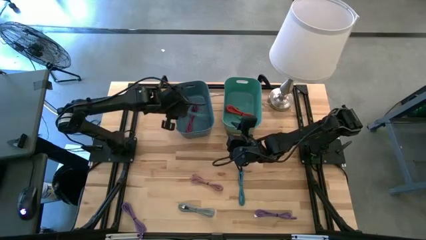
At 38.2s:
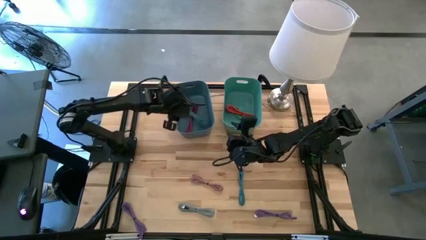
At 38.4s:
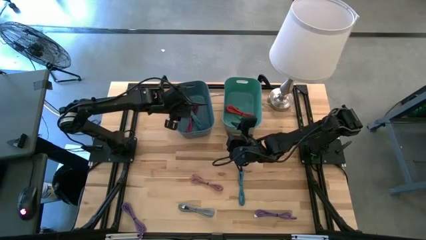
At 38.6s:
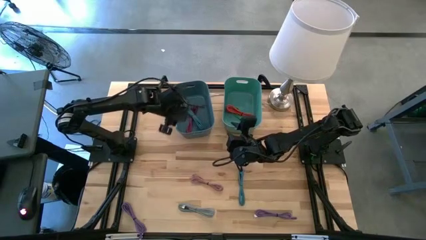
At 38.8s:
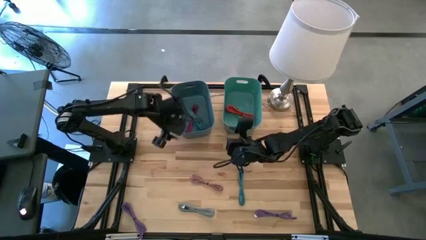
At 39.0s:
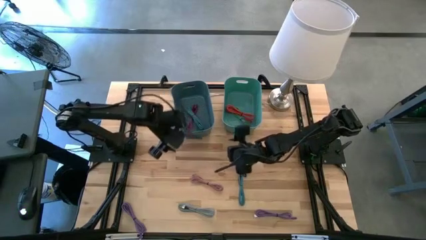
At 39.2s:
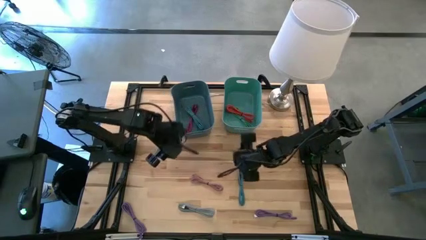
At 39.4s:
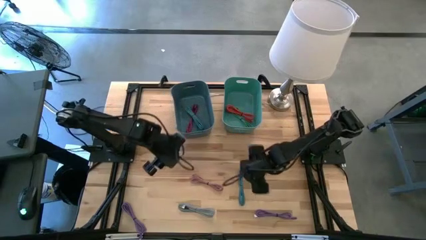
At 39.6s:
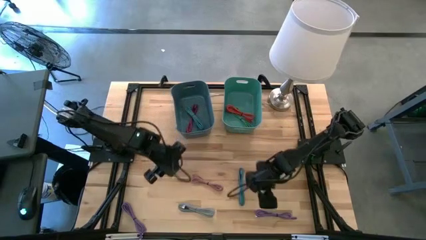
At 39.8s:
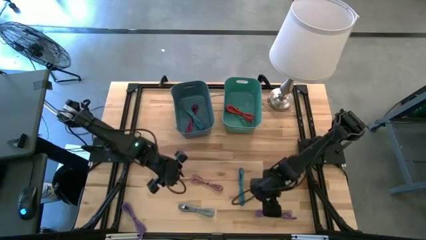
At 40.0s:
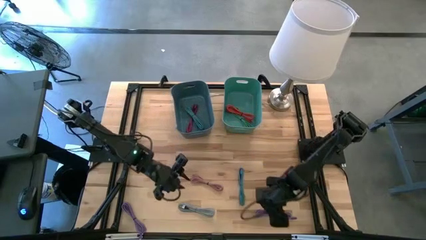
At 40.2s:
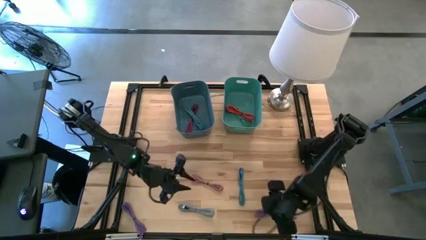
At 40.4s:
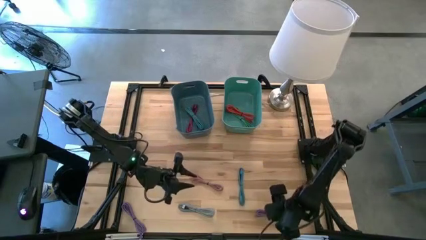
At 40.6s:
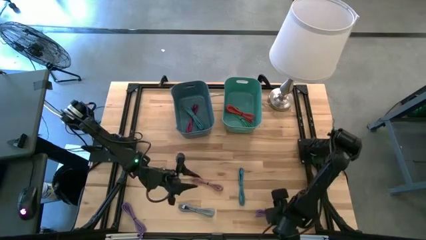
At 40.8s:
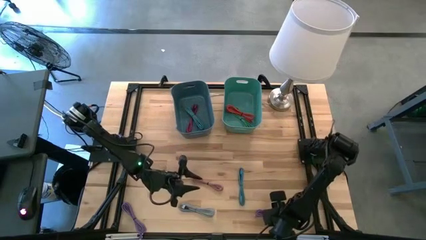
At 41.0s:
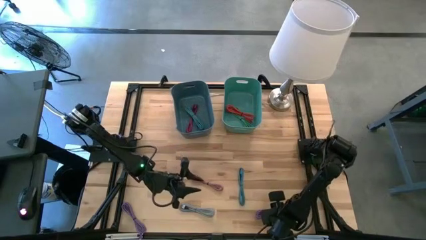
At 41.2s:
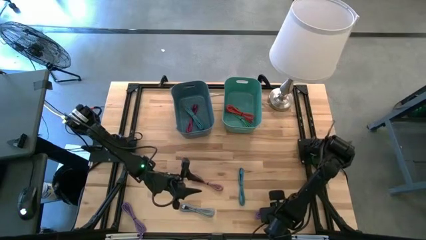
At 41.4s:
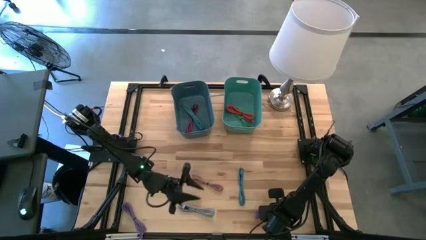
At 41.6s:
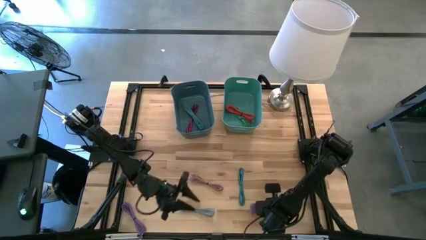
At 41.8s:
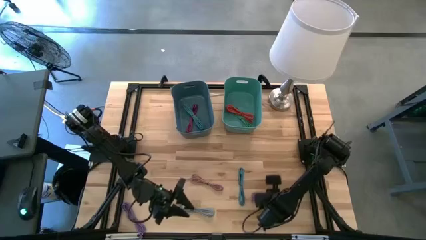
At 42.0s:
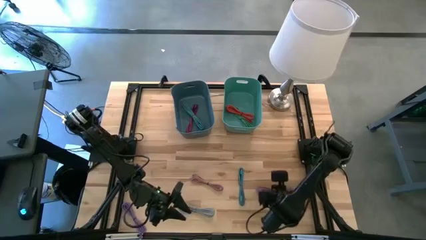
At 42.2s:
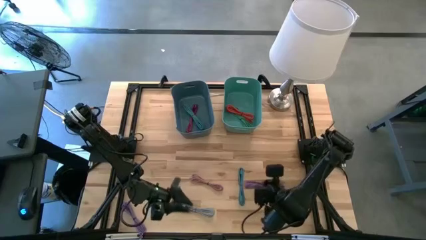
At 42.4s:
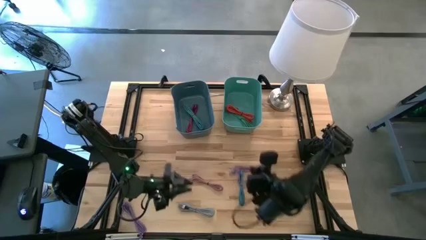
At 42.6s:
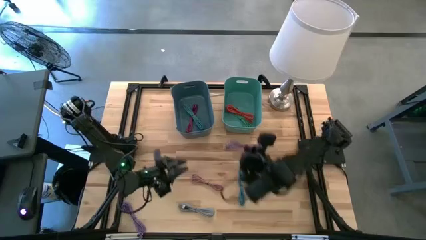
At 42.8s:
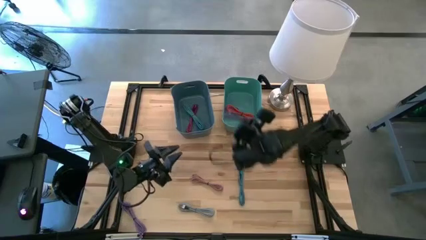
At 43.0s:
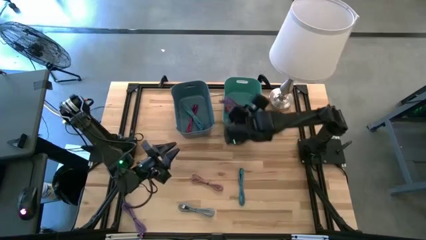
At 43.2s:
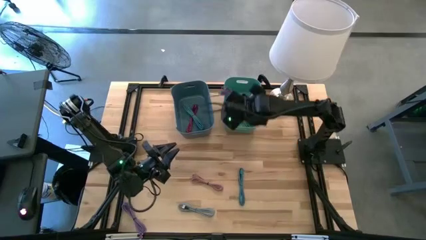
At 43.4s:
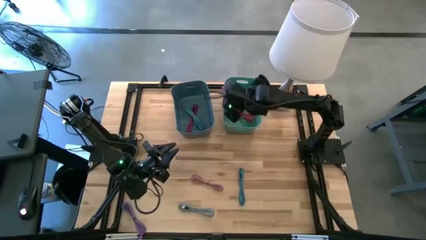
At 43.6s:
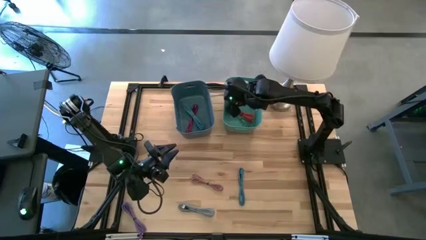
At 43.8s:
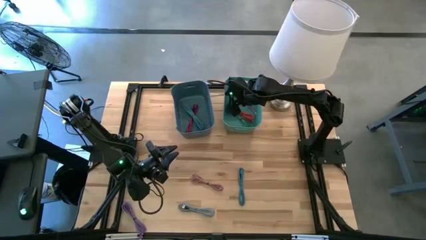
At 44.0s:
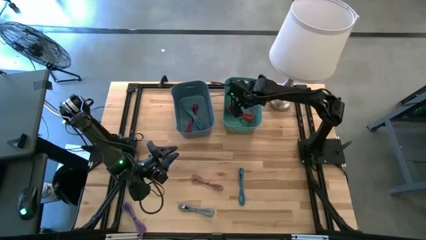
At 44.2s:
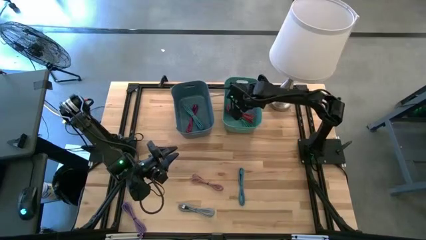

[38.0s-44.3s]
Task: Pick & Place USB Port
Put the right violet charger cable into the green bin

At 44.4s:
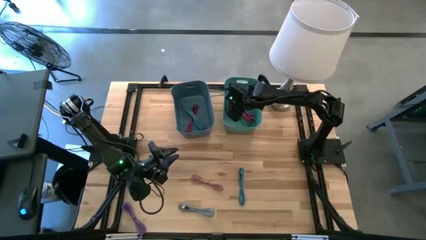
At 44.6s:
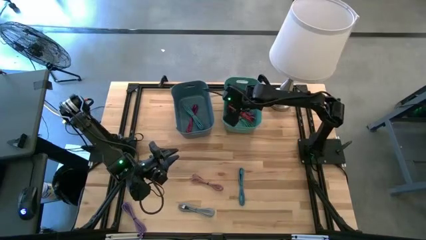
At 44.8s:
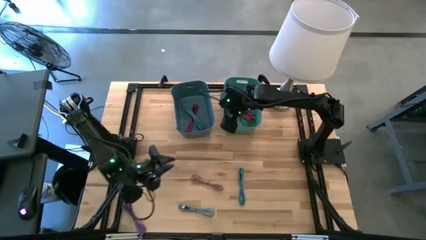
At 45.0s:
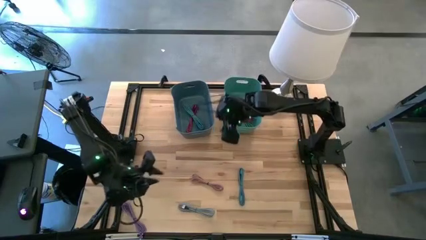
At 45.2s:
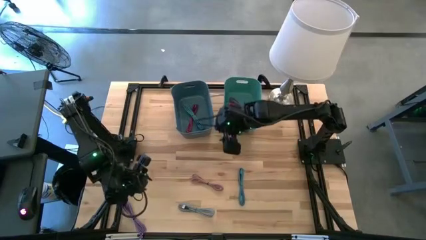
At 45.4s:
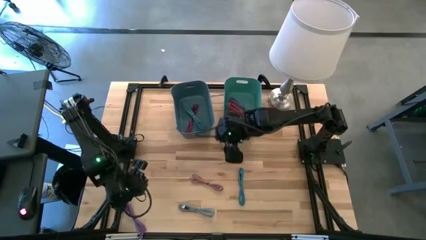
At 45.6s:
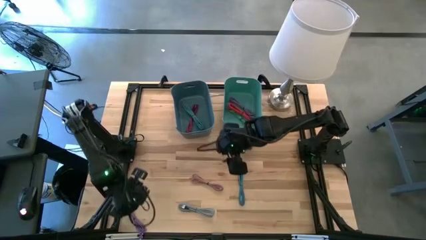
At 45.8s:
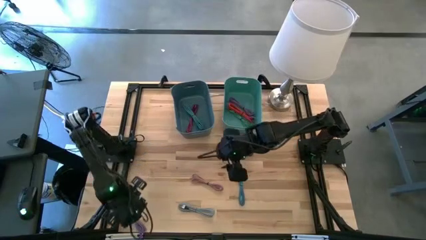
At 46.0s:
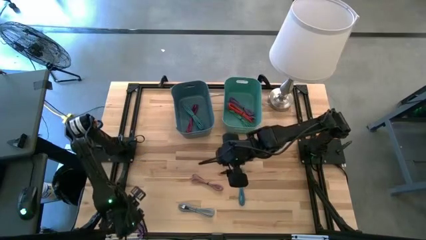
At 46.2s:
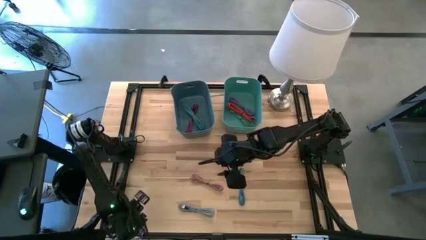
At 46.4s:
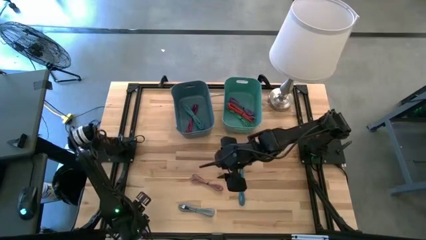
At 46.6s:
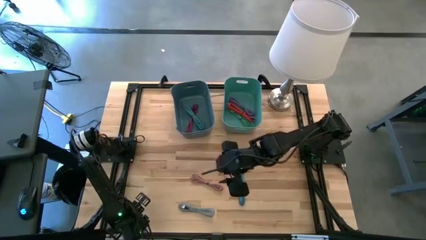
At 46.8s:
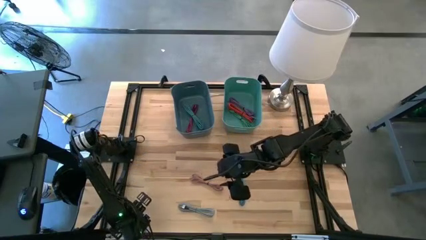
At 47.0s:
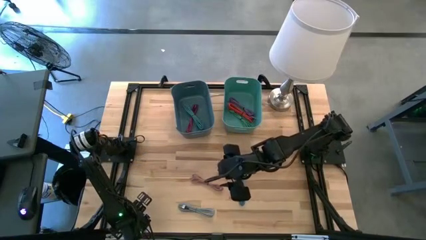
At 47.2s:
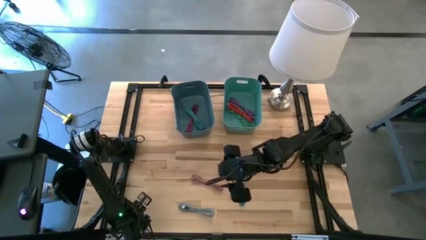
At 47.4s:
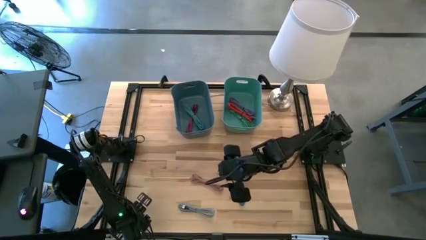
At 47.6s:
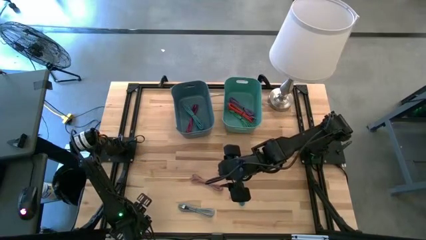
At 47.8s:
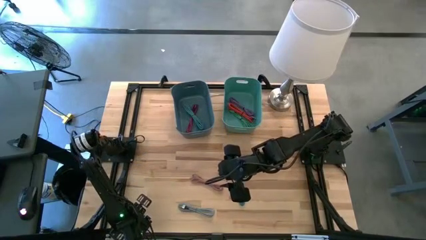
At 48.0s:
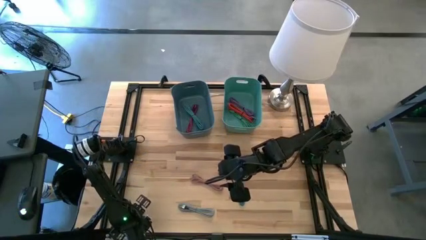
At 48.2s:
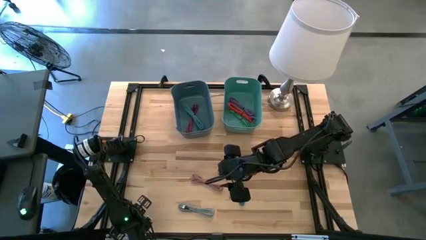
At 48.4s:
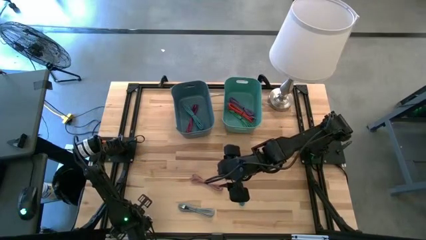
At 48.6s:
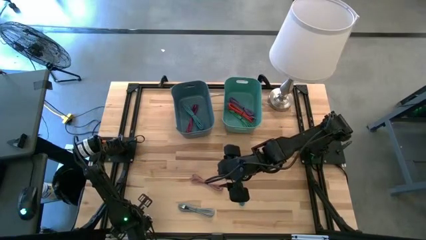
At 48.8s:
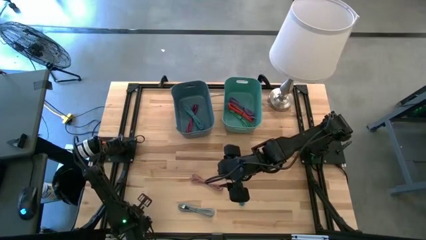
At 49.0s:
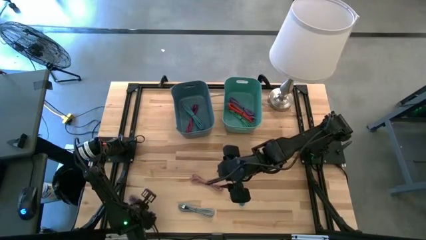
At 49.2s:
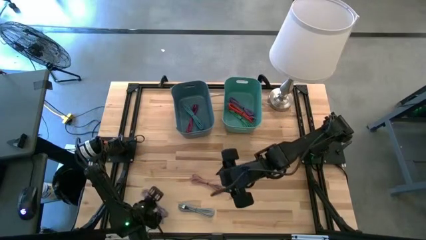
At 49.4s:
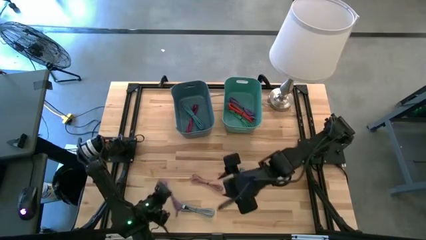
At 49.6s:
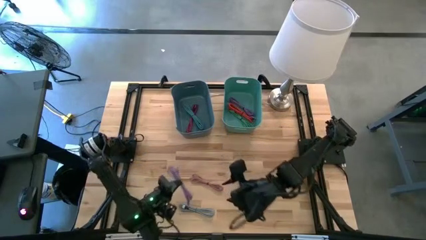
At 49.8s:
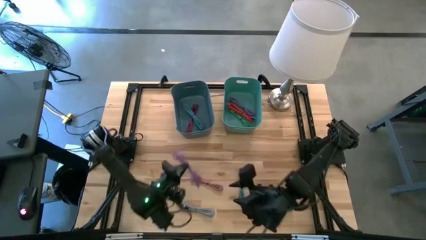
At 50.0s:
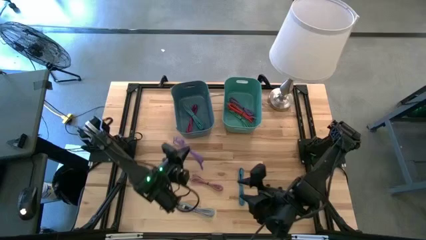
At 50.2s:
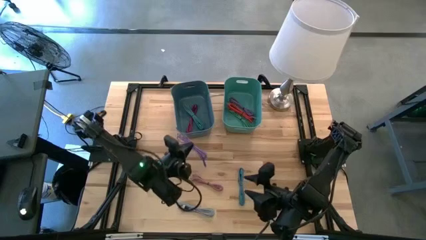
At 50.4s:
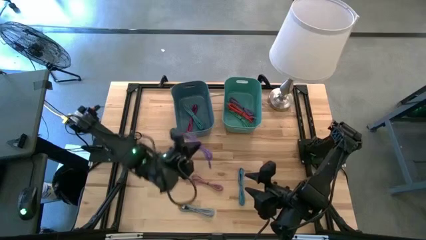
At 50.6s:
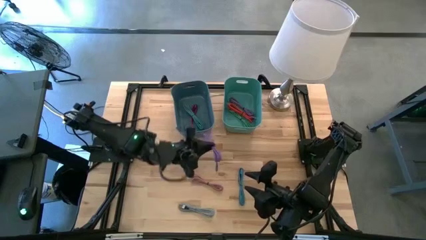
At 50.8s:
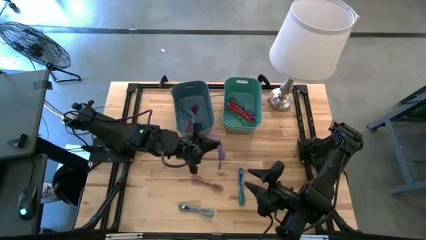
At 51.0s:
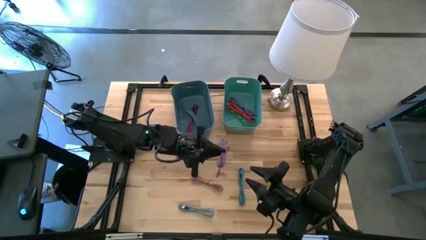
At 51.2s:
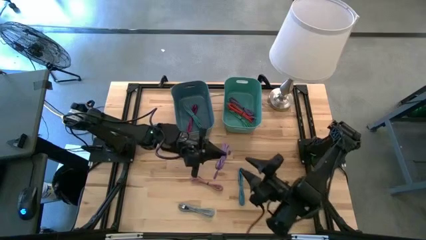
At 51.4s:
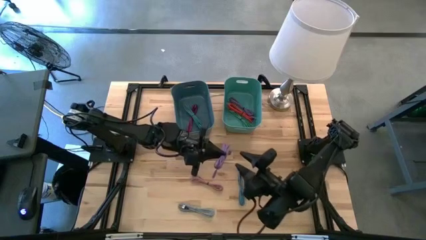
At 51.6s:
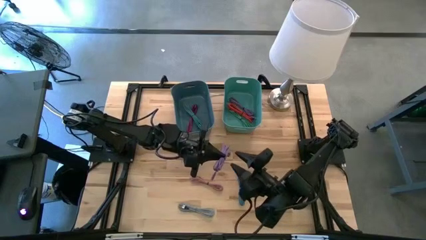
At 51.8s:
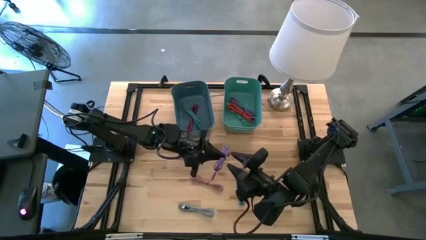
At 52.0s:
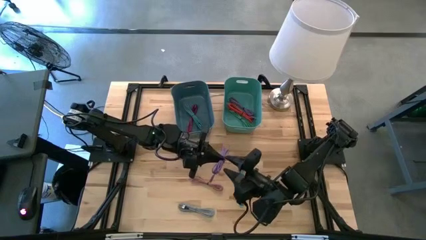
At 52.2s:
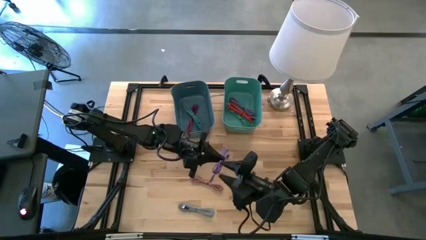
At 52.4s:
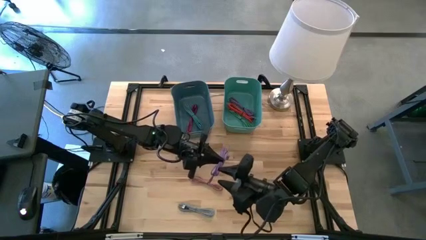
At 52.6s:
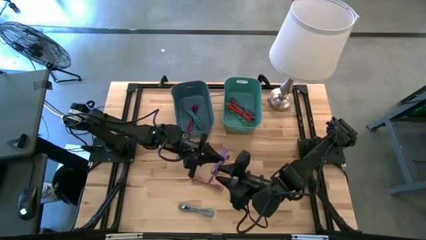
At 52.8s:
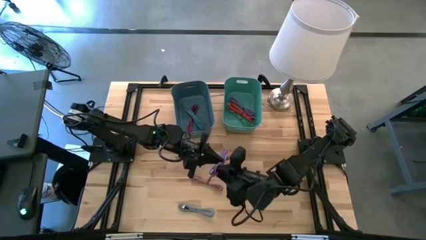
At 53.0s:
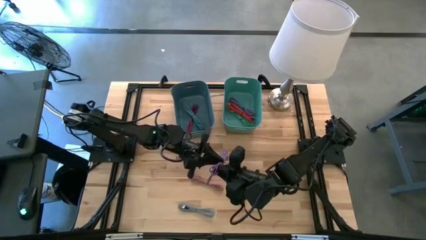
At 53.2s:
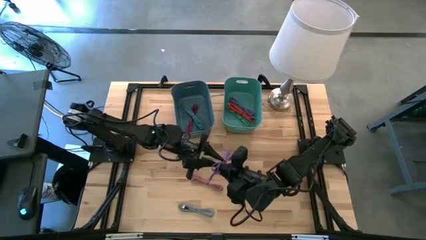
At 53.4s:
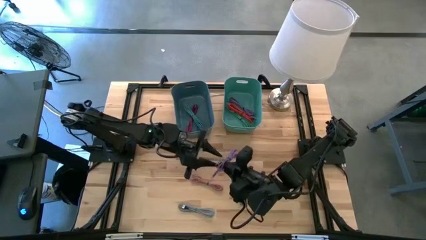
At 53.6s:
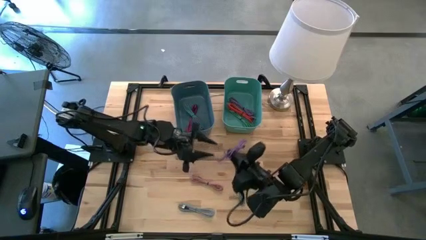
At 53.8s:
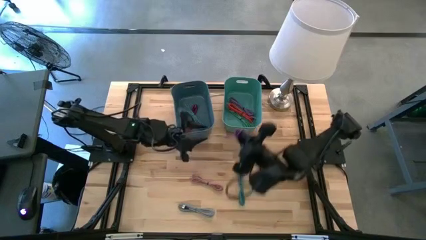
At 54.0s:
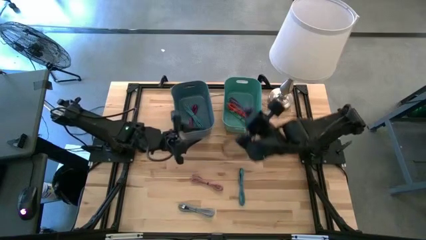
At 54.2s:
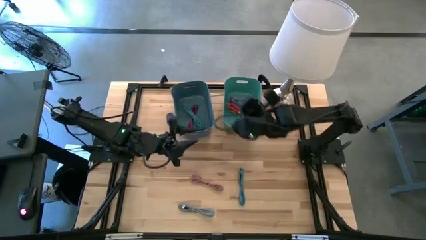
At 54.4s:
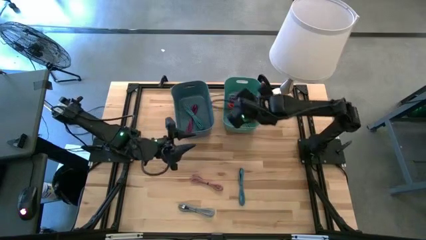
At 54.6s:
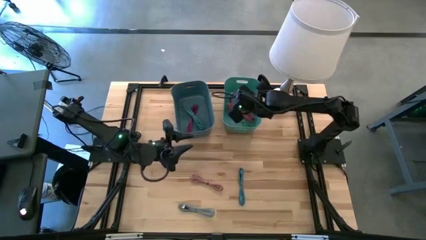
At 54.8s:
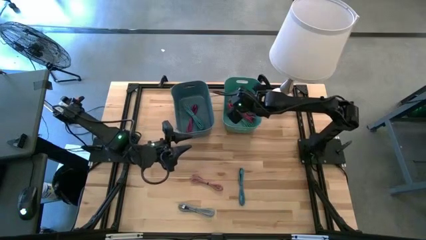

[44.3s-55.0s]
Put the violet charger cable into the green bin

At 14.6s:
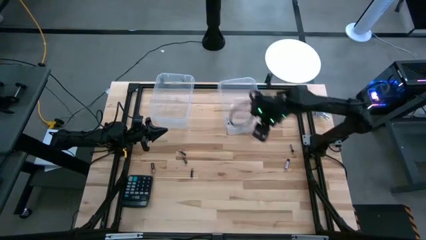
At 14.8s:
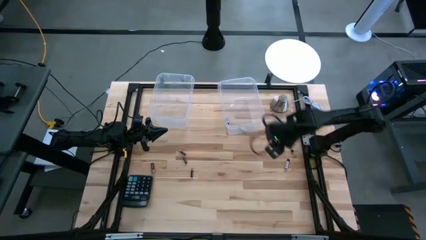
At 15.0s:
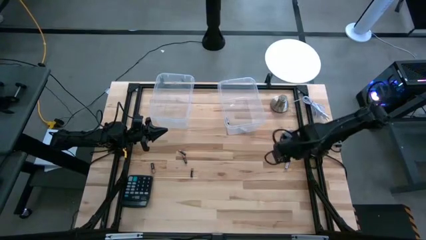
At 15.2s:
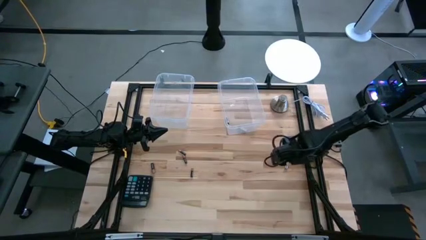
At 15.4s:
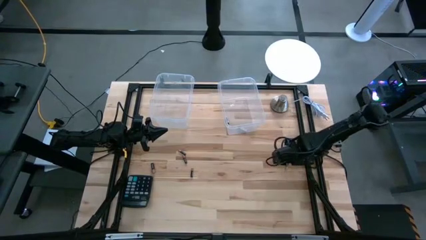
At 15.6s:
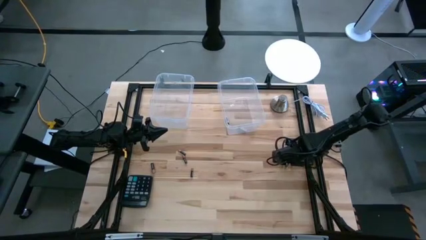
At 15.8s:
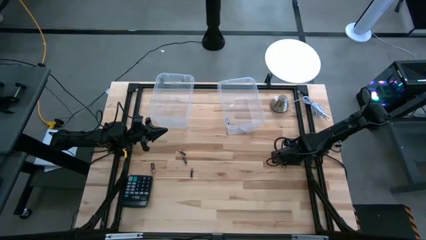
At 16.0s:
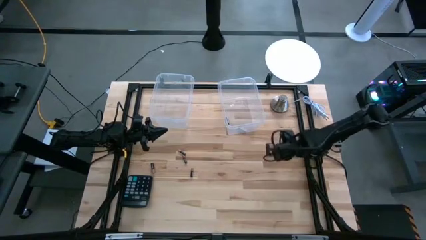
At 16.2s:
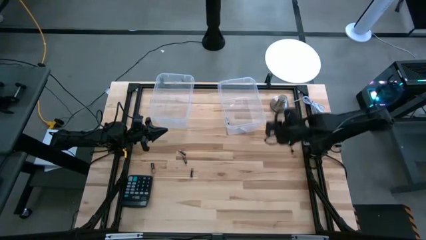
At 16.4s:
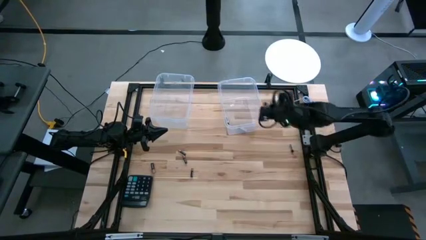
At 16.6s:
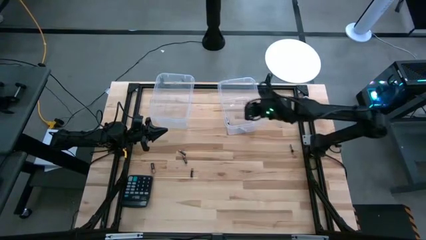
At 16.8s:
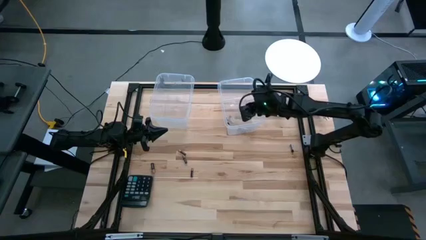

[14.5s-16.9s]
Task: Sort batteries
Put the silver battery into the right transparent bin
